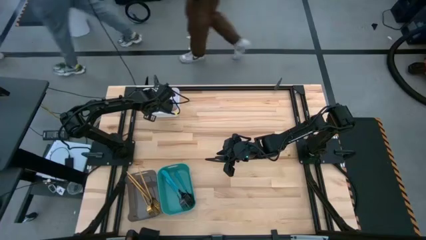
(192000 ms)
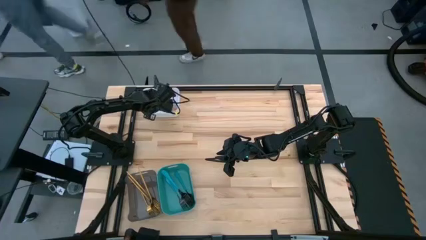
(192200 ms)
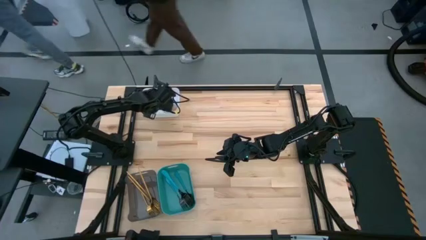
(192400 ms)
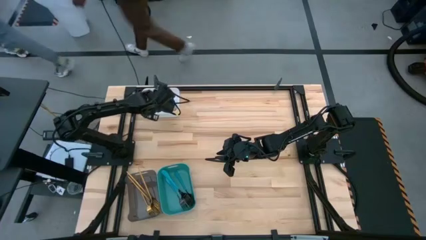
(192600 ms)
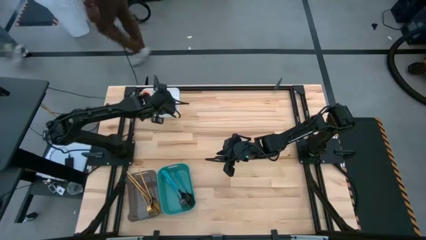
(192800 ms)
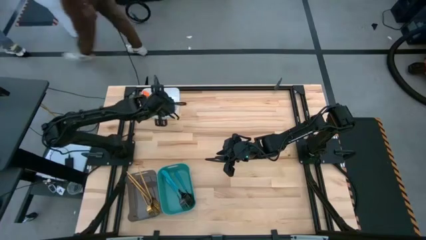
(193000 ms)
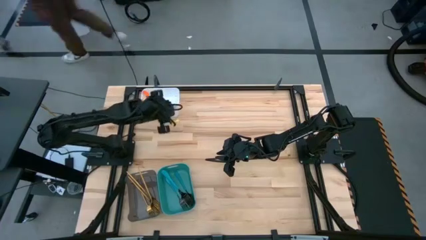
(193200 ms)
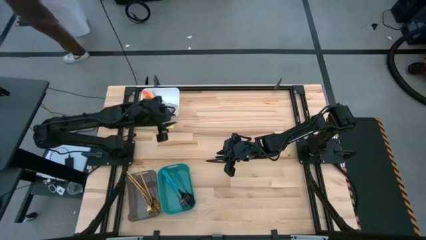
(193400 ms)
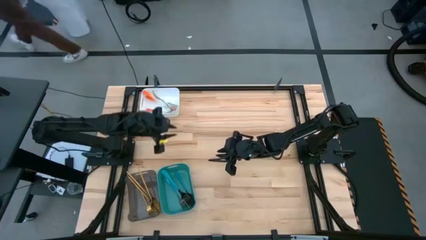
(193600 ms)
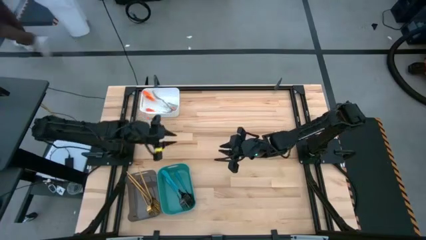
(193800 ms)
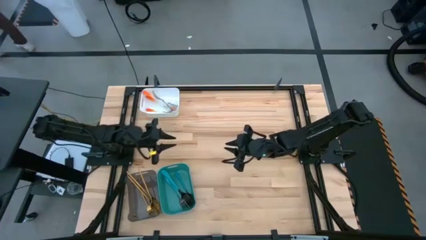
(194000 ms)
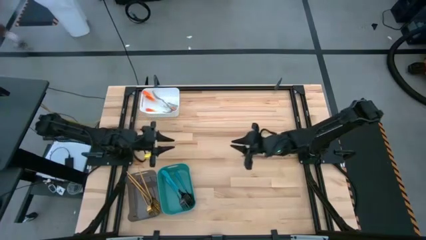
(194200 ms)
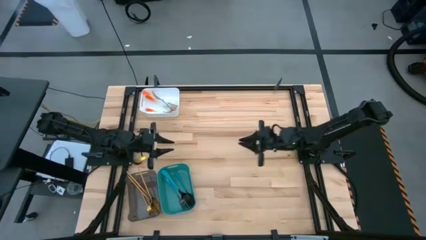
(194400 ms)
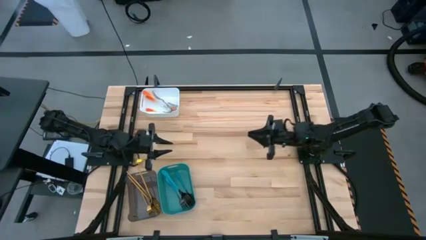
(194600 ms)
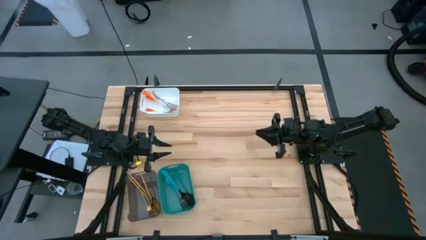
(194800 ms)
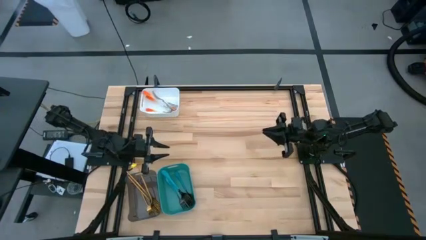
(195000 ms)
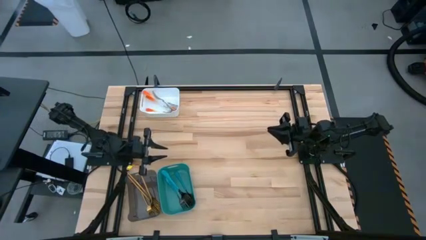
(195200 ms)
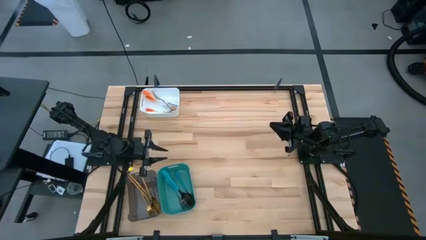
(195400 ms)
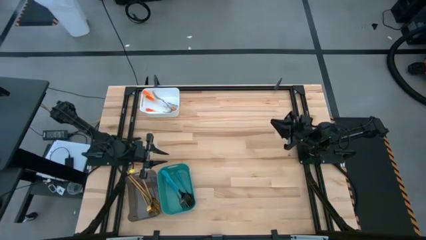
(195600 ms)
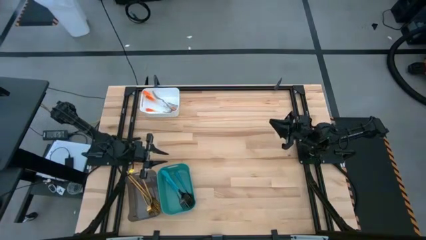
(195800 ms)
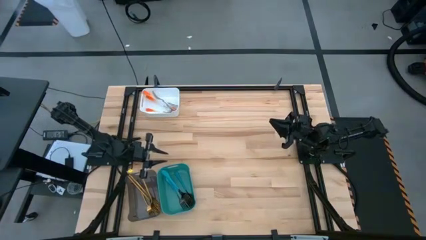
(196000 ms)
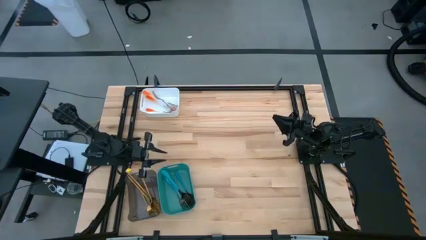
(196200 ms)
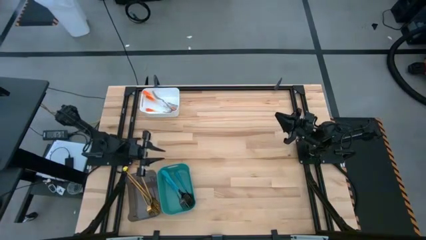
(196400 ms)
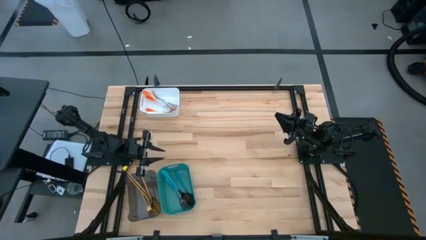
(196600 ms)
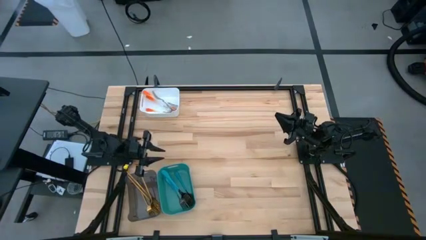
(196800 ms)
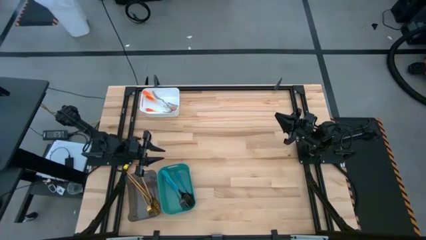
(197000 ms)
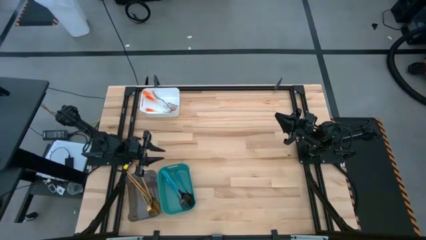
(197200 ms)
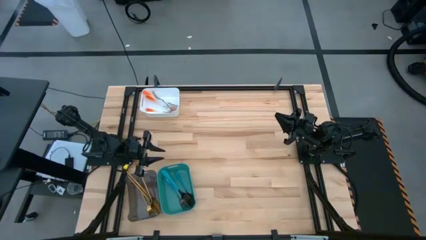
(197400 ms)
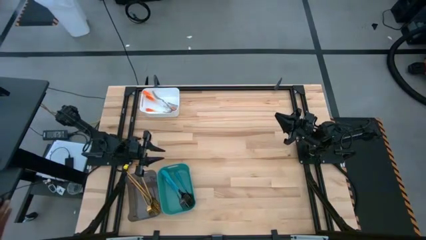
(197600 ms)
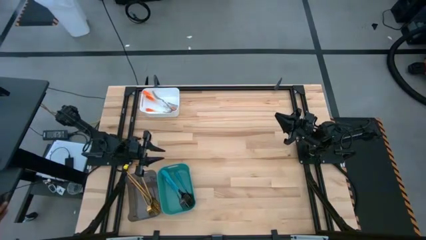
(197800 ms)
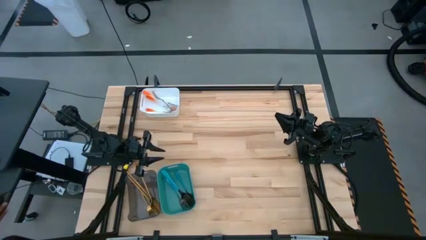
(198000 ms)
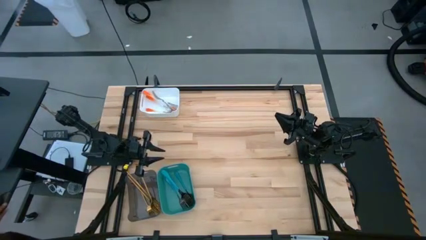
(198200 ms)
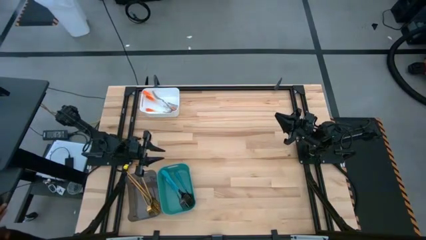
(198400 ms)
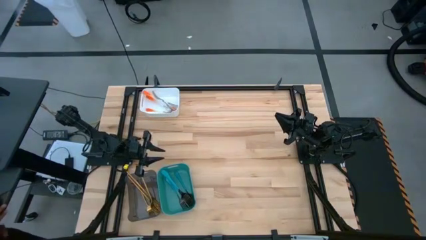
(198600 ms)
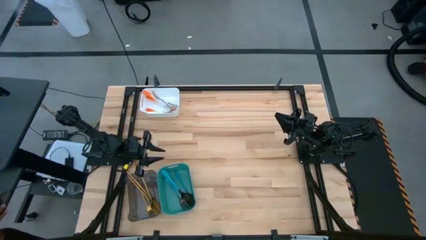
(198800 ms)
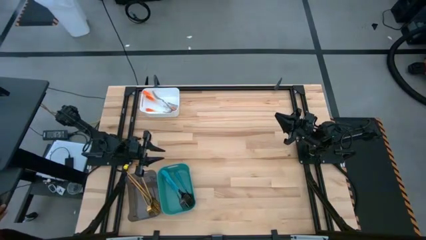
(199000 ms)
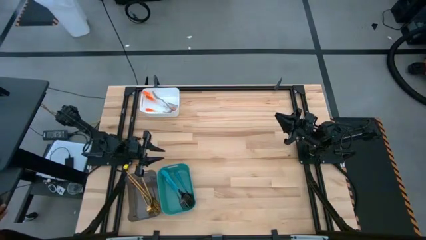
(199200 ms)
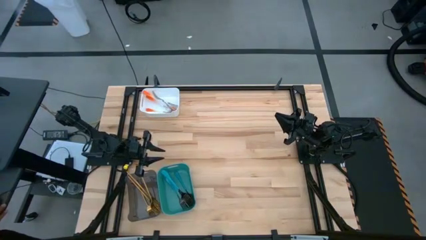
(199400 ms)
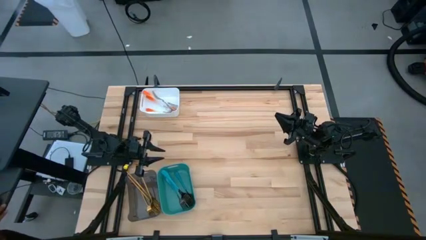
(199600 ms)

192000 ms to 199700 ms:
Task: Sort silverware by color (type)
Return to Home Position

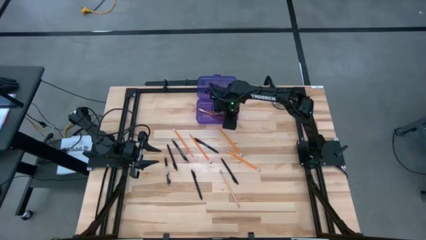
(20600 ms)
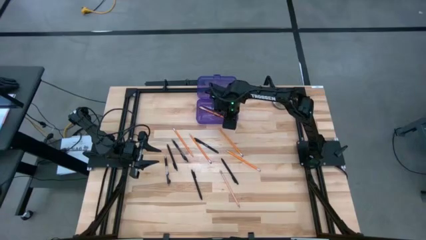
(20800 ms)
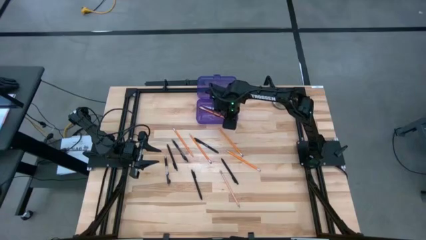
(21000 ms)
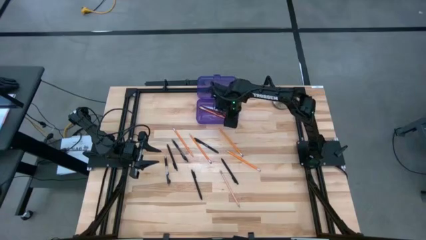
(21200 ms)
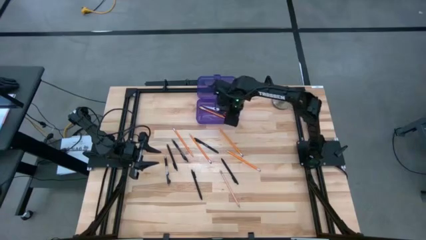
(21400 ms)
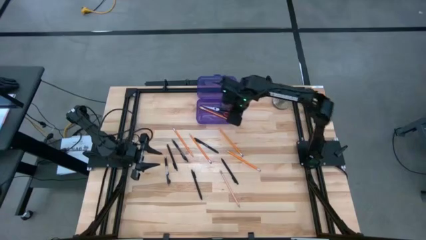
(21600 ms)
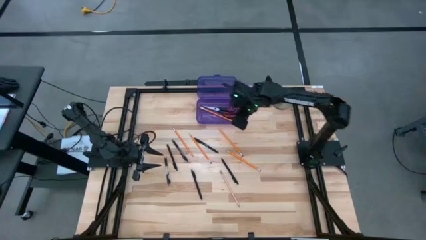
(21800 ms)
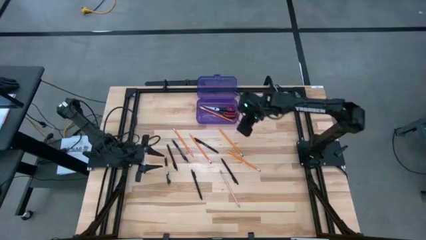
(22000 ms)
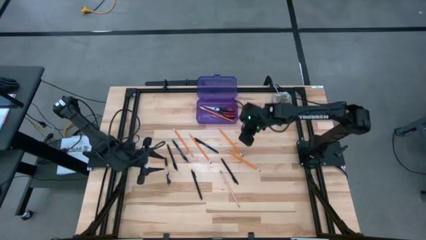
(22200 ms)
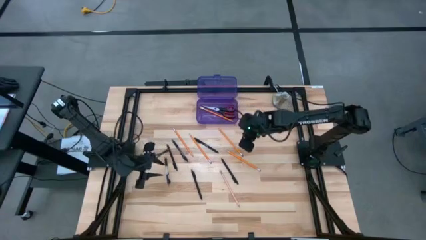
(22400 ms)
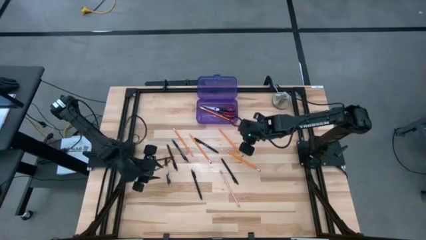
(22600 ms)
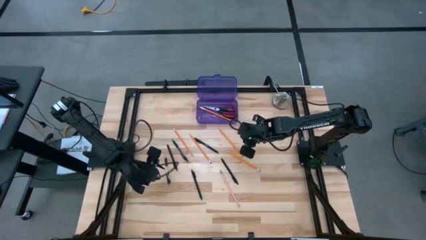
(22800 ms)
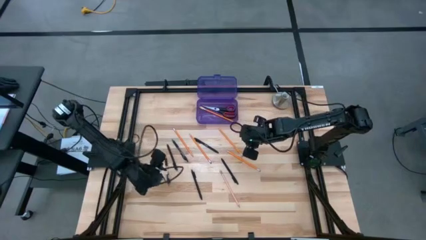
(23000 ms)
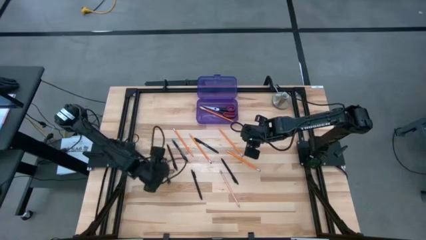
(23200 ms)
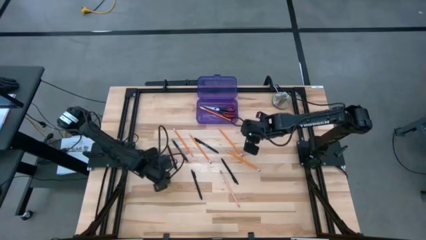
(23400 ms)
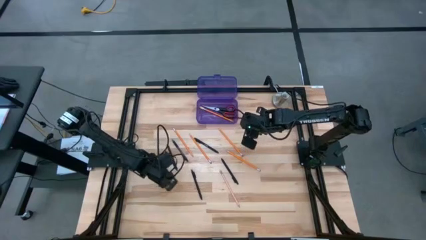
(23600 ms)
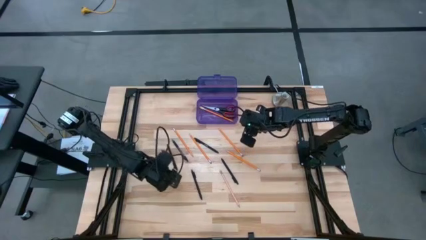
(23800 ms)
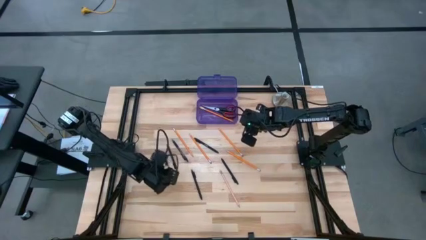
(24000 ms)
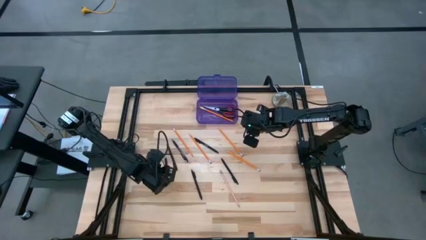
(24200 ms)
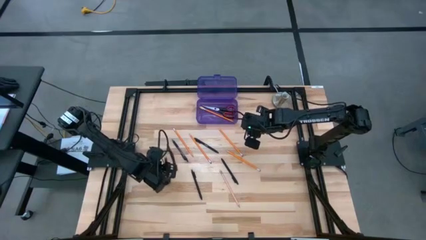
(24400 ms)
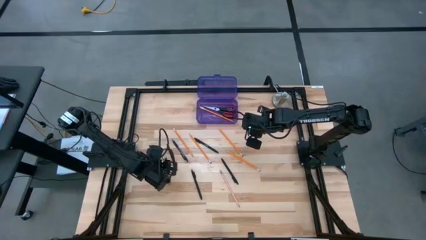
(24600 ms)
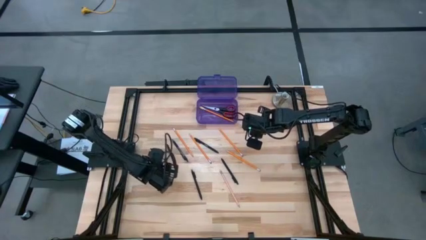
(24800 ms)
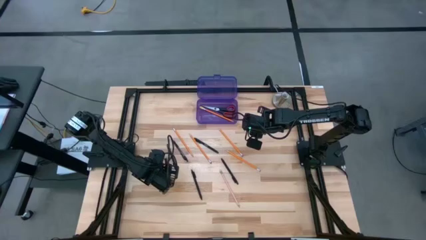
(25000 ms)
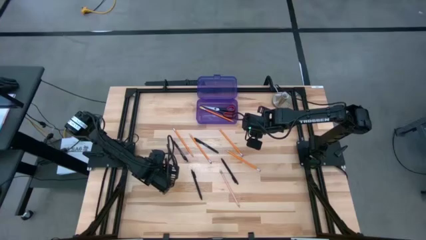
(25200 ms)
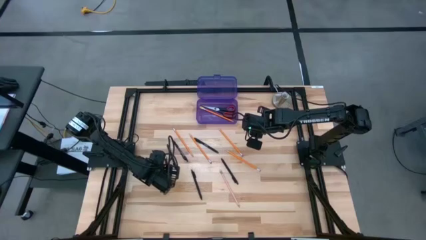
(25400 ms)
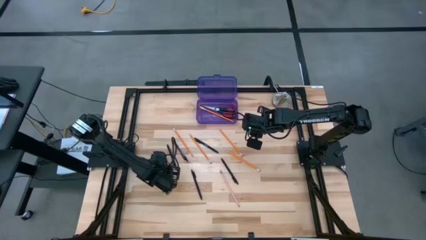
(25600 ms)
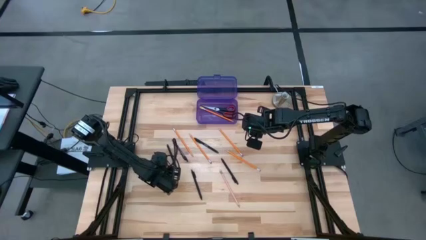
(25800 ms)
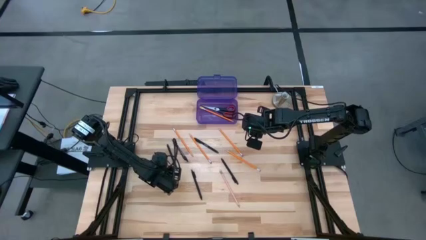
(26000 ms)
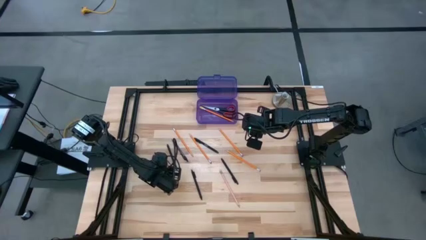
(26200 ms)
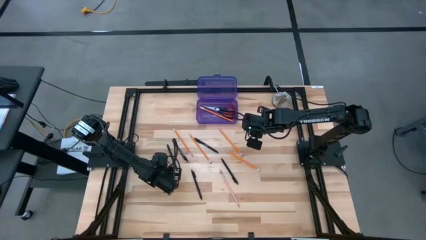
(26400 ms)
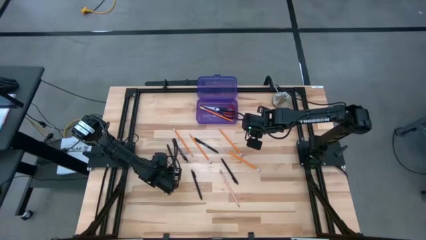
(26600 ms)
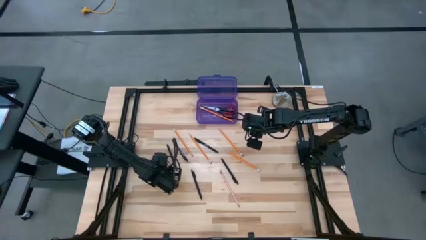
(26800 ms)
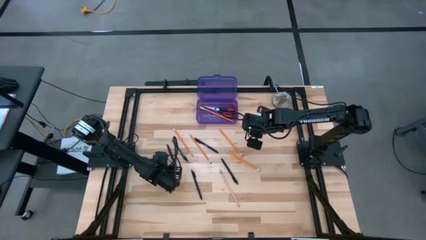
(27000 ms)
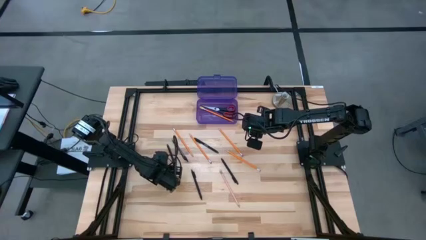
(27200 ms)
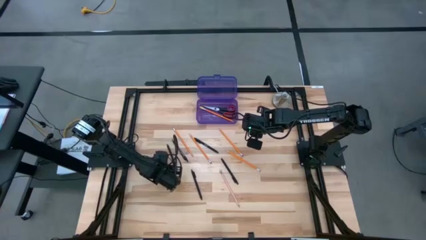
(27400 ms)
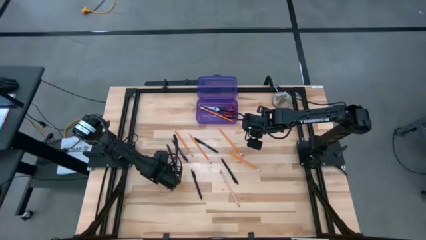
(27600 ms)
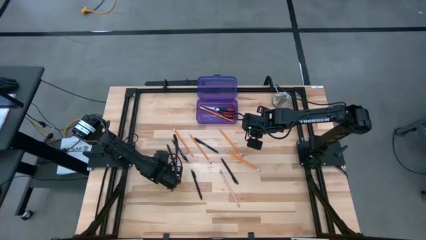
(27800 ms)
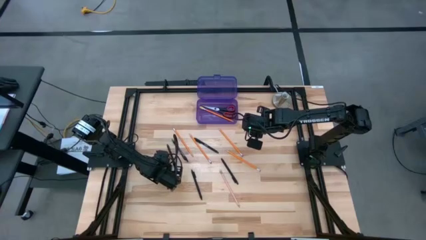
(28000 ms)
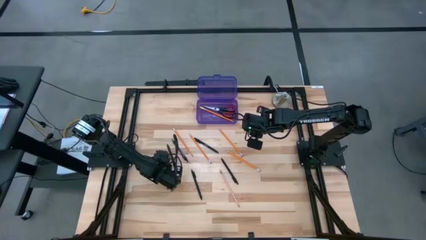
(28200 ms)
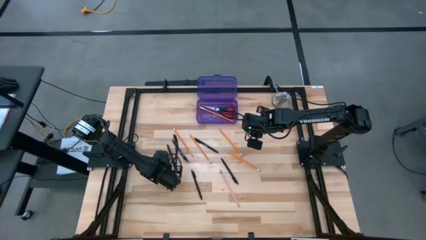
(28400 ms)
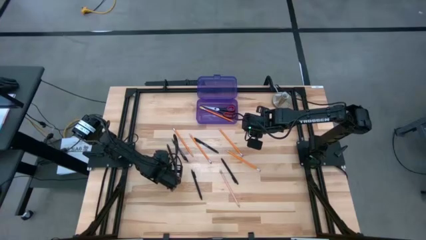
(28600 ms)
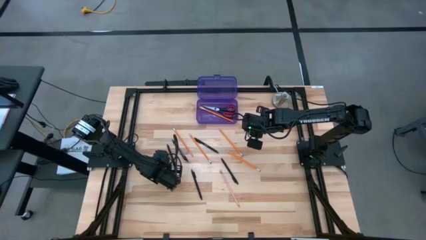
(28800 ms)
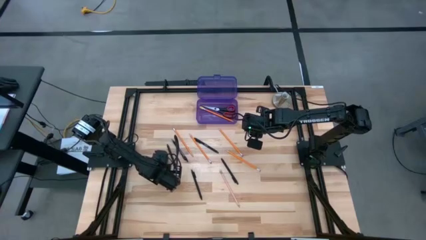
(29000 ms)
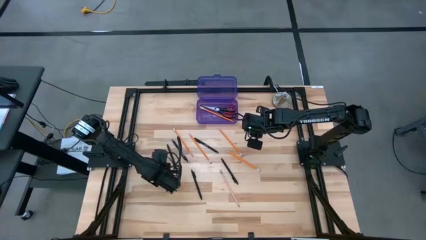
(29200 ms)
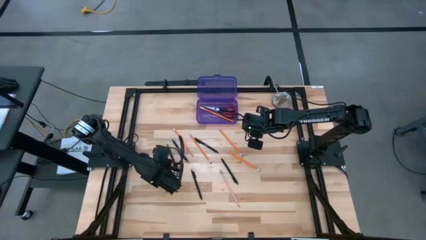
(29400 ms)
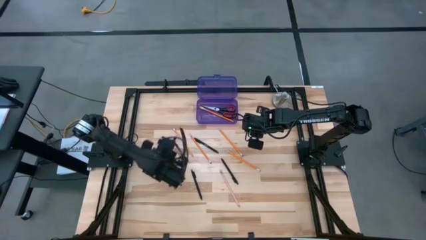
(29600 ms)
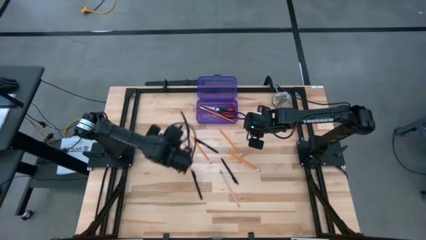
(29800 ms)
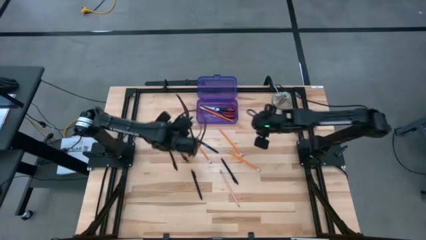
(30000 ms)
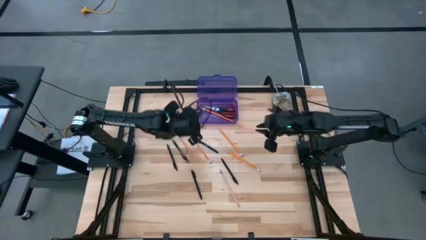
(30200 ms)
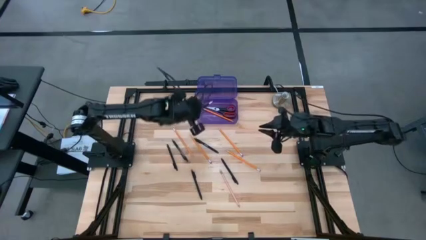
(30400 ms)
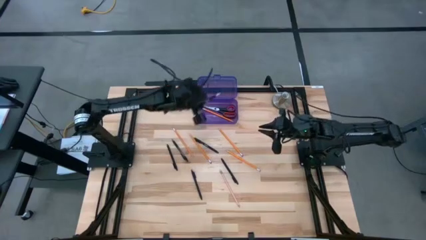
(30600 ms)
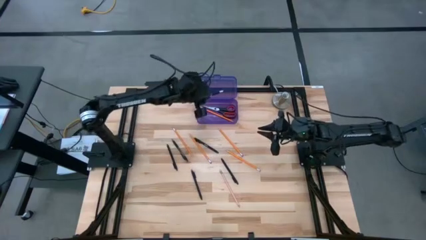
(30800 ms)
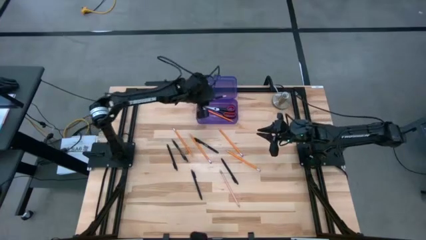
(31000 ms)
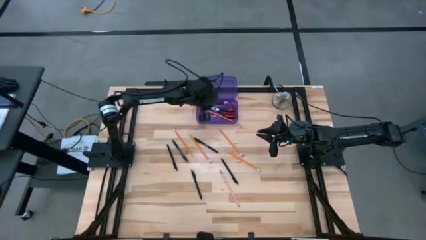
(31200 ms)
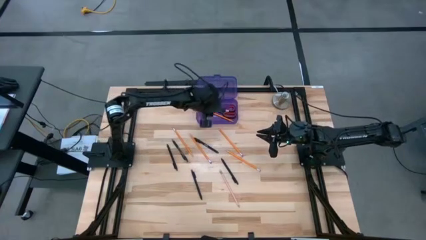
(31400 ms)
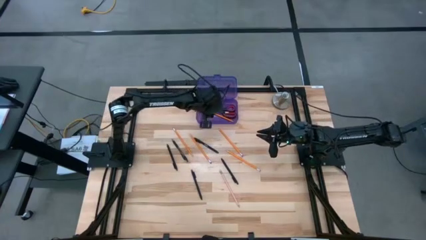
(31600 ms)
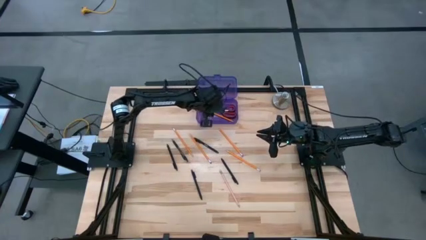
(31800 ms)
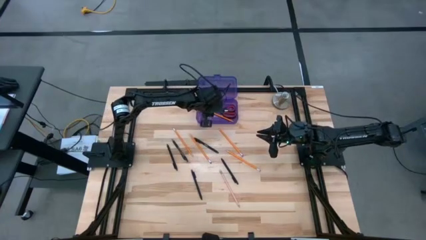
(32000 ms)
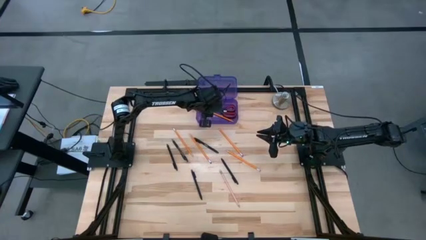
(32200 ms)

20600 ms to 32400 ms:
Task: Pick & place school supplies into a supply box
Put the black pen into the violet supply box
